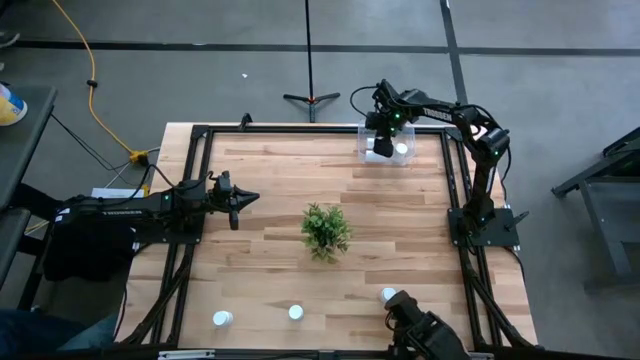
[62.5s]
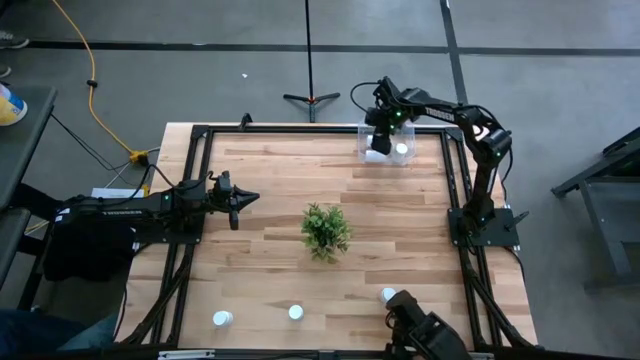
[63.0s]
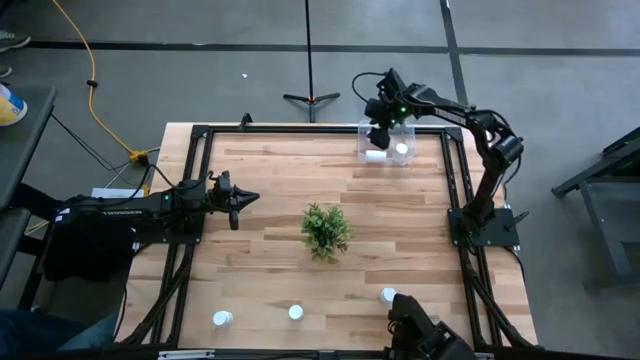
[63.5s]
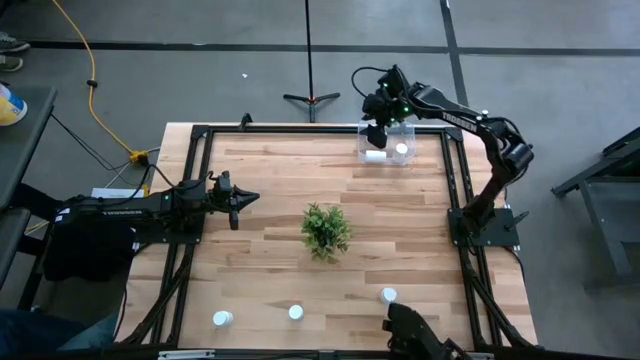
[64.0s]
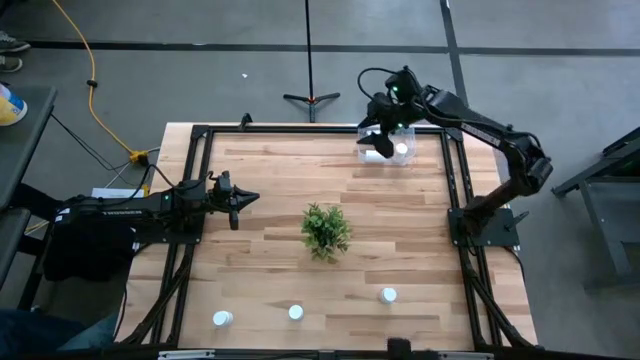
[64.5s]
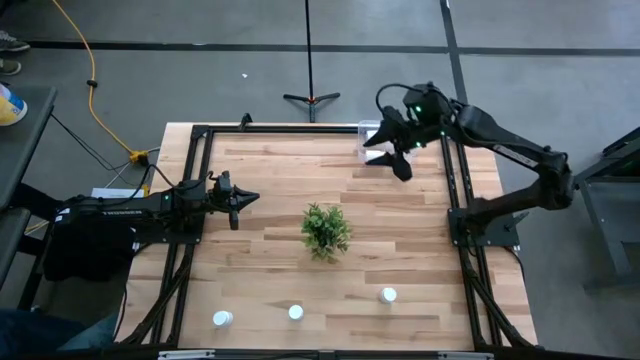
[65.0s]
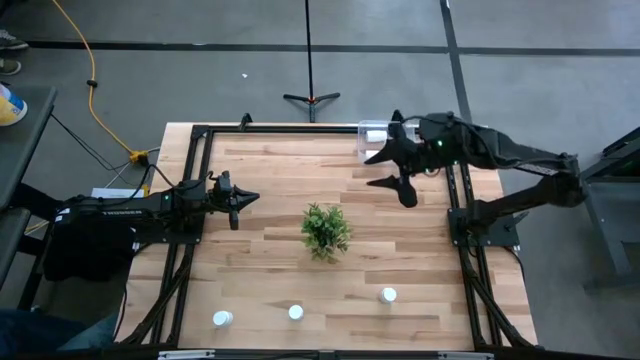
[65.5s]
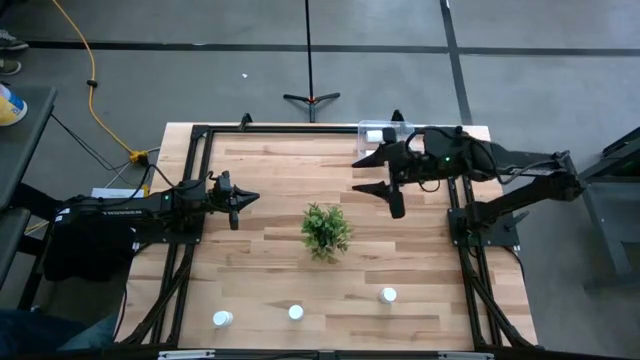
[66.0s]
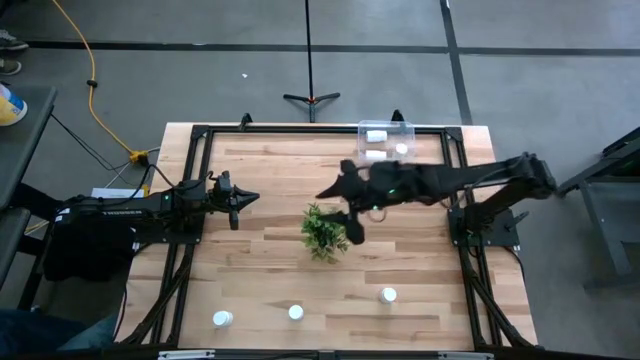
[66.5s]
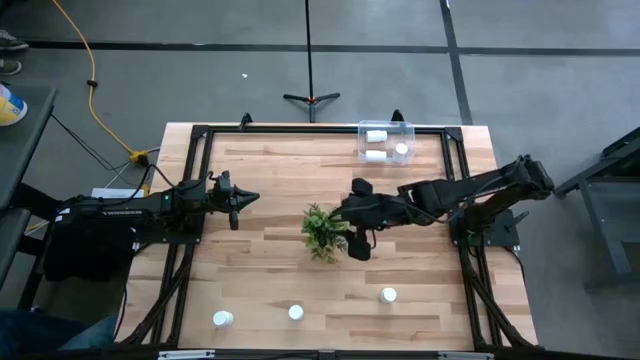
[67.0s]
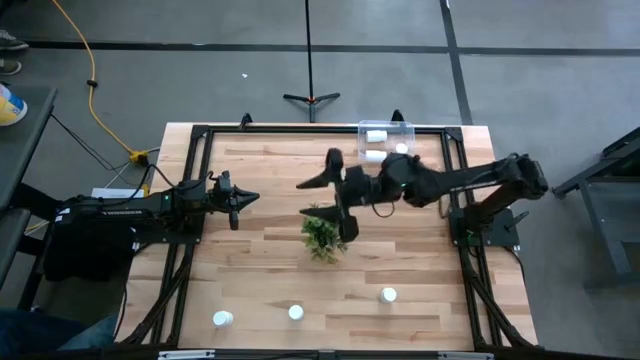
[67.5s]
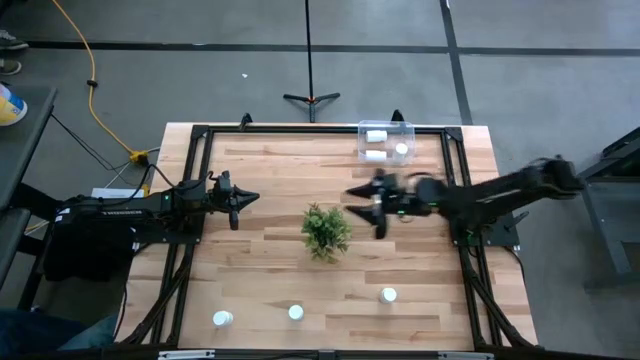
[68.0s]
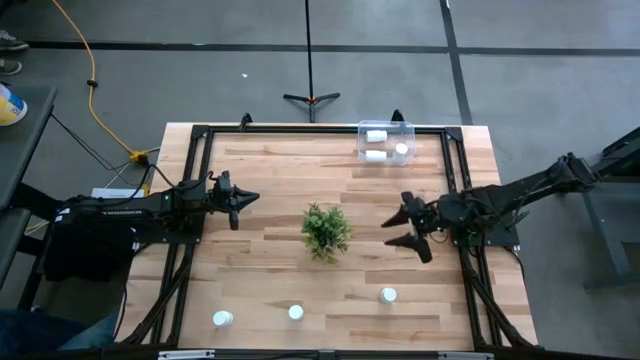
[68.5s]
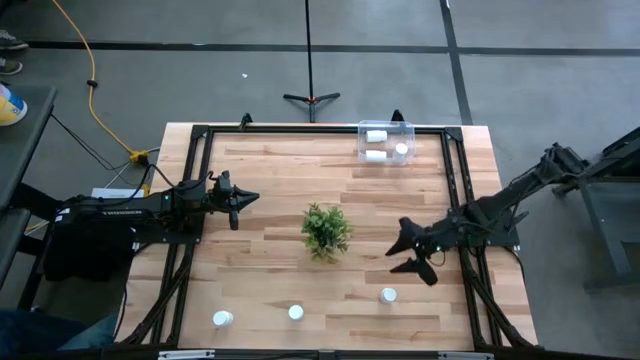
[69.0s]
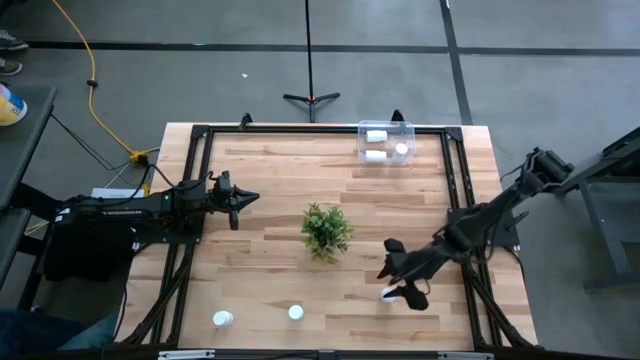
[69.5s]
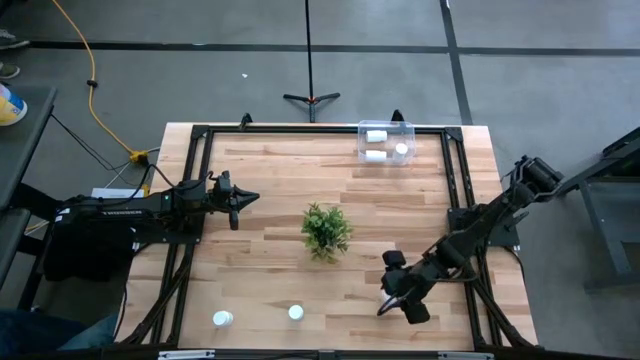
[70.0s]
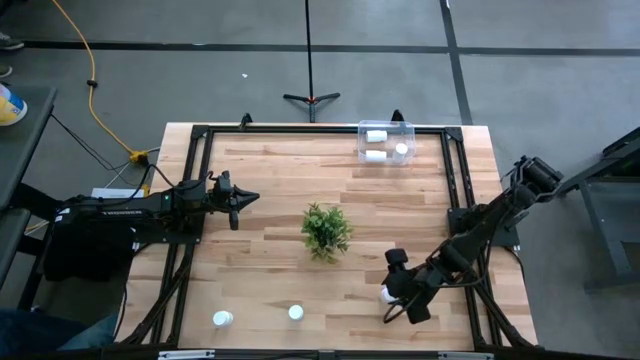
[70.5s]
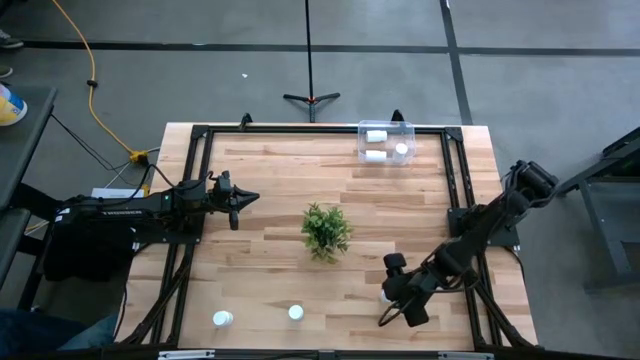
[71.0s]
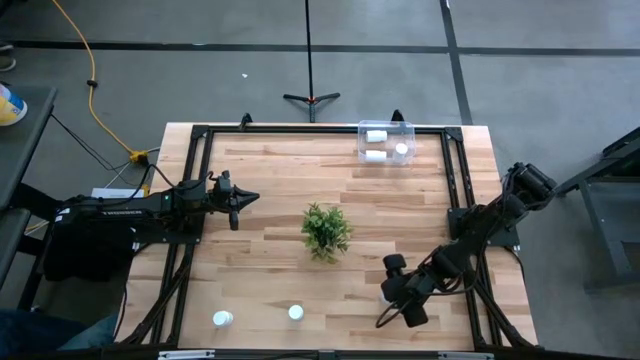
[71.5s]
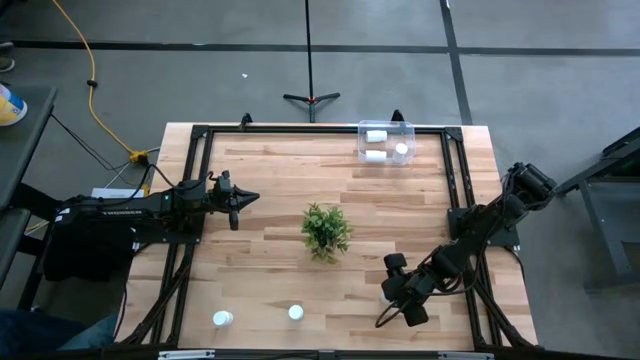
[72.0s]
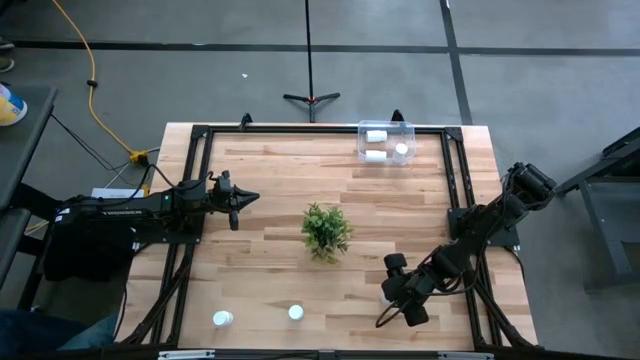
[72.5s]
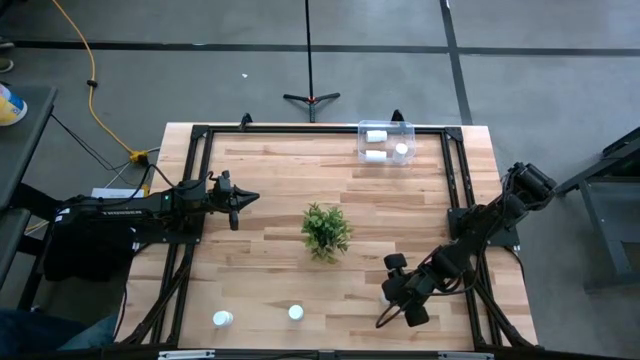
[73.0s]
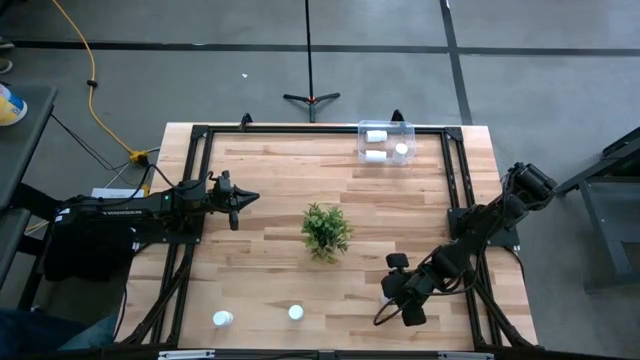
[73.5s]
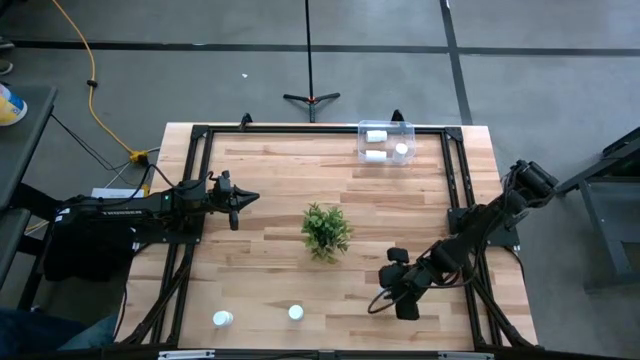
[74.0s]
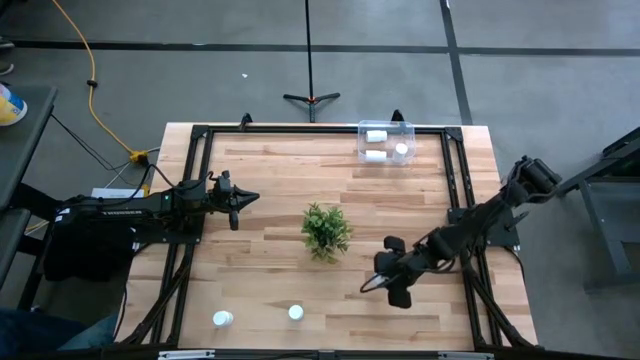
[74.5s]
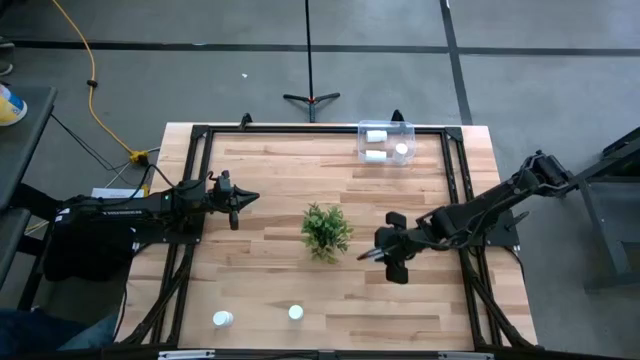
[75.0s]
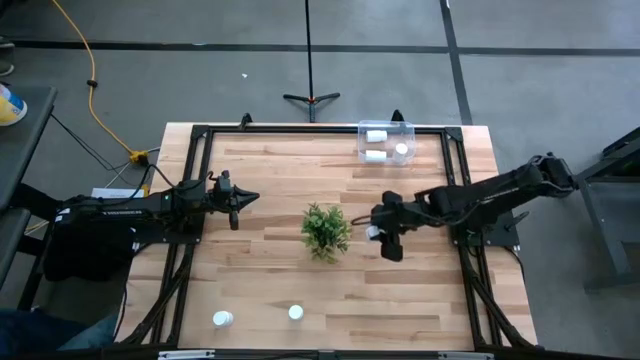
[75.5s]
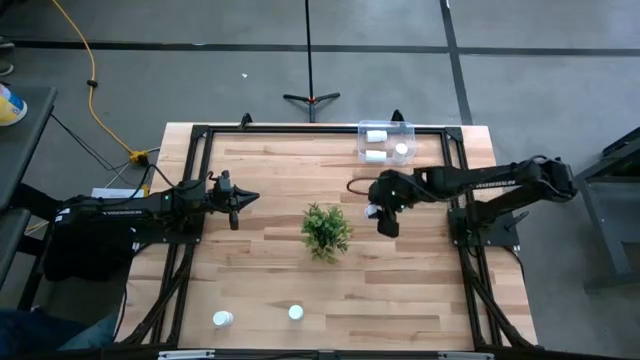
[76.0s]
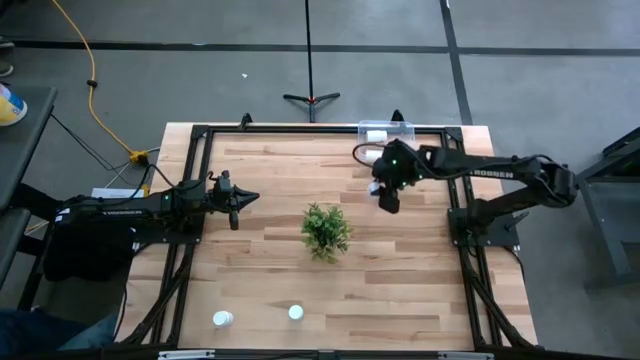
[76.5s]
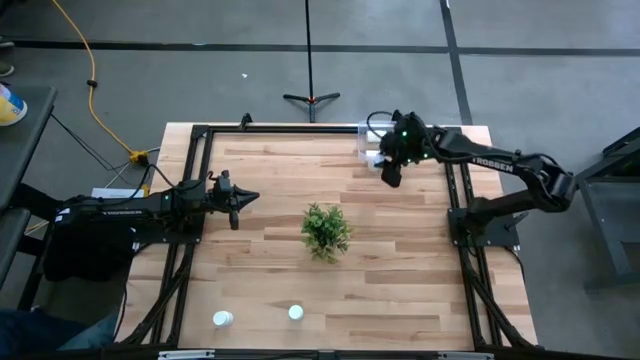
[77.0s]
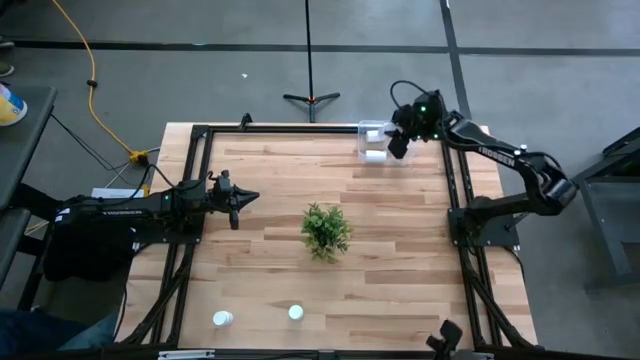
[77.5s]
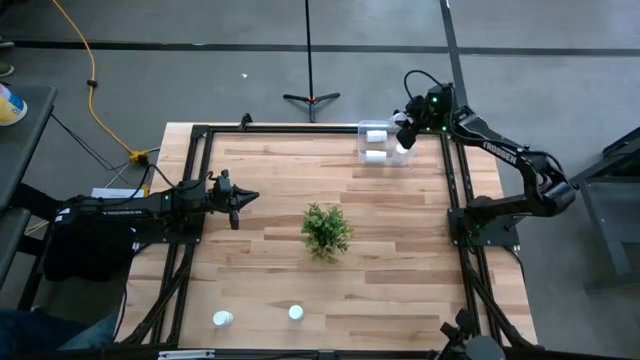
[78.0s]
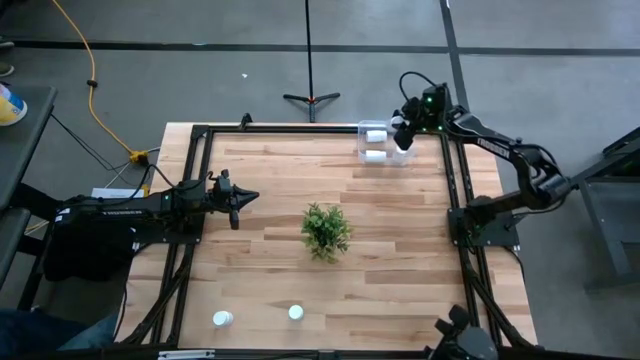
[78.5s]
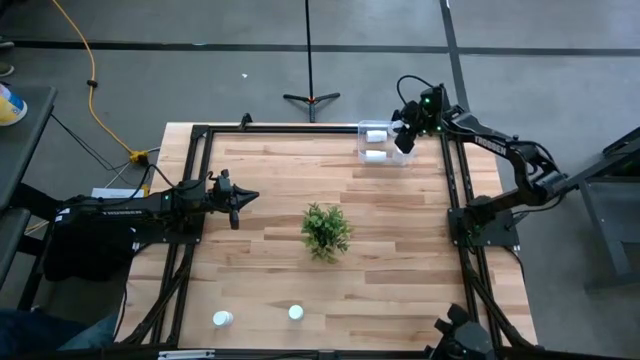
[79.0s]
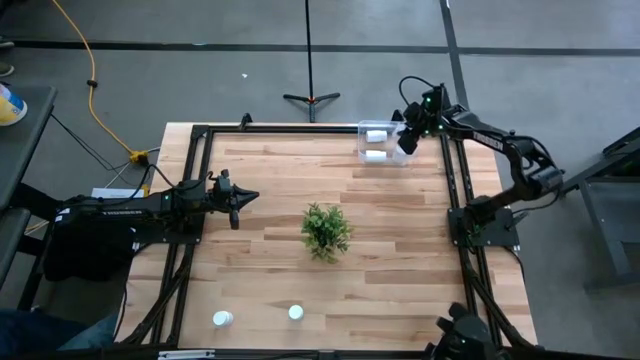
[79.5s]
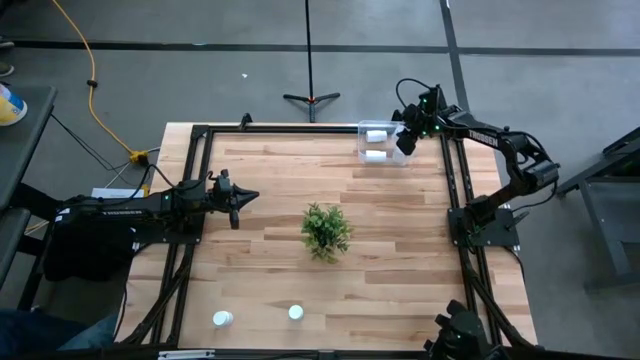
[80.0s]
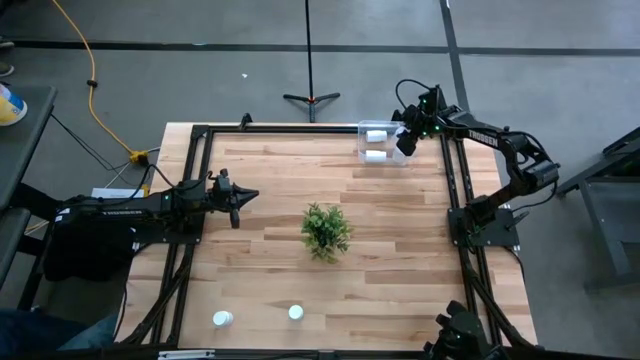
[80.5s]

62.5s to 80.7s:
Task: Pick and place pill bottles into a basket
Put the right white pill bottle into the transparent bin

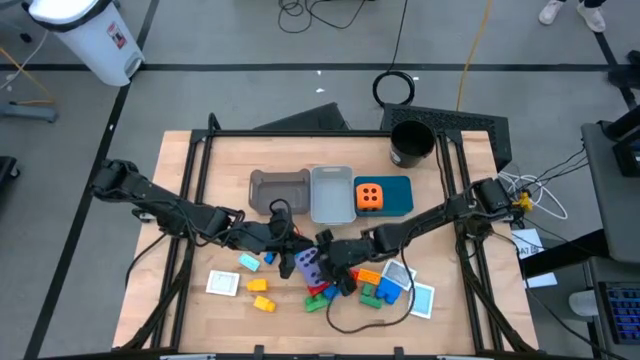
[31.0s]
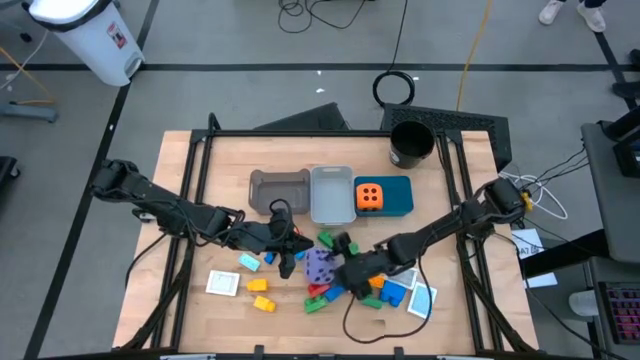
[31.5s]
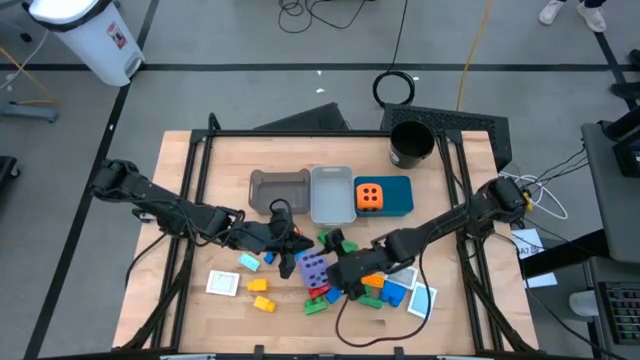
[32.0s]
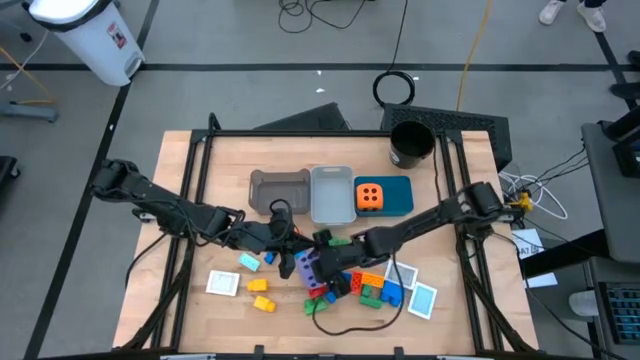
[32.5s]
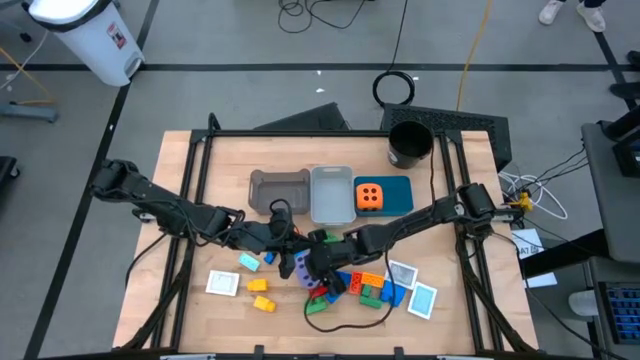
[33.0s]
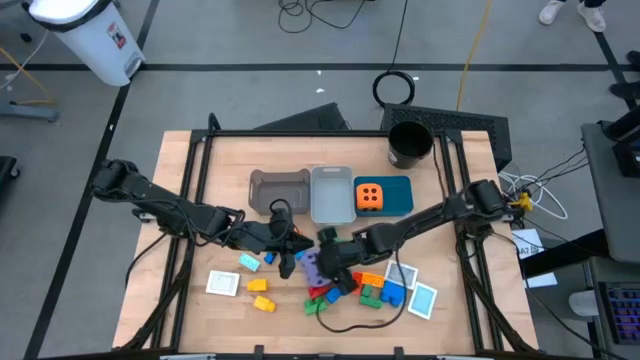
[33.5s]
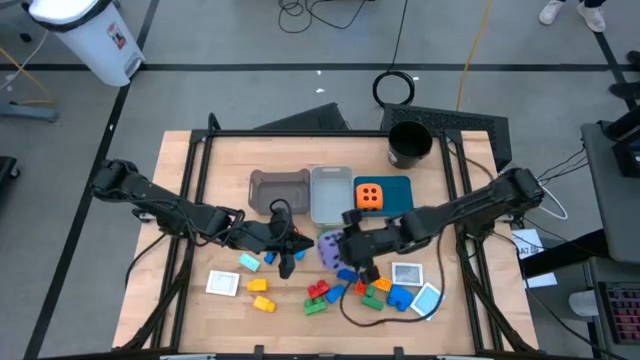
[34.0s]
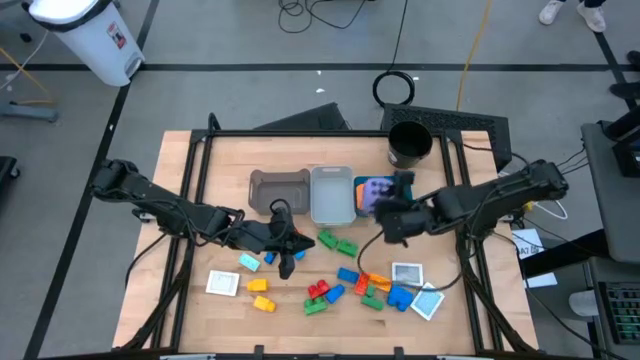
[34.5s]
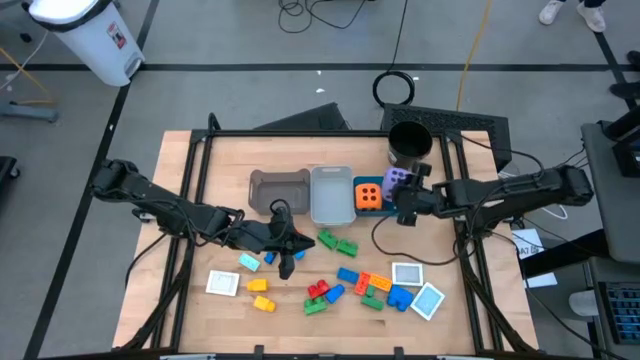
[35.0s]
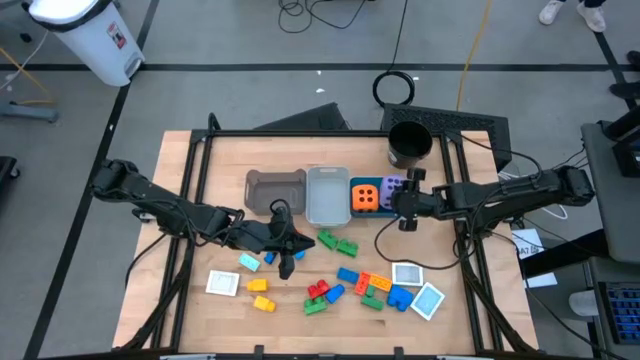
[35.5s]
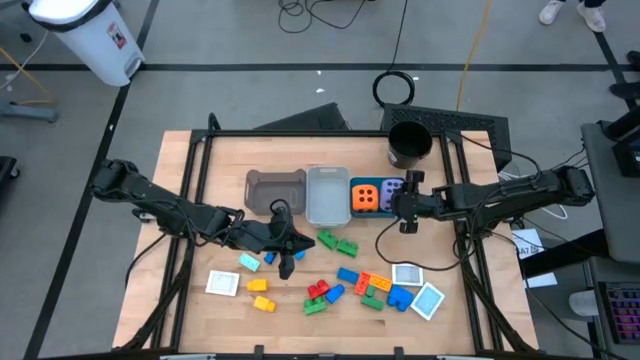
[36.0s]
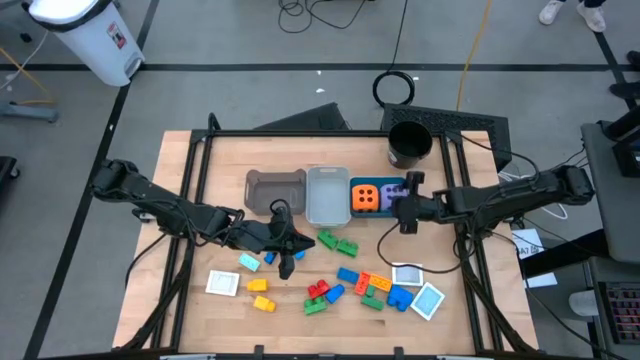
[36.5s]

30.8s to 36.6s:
Task: Pick & Place Toys
Put the purple die into the blue bin
